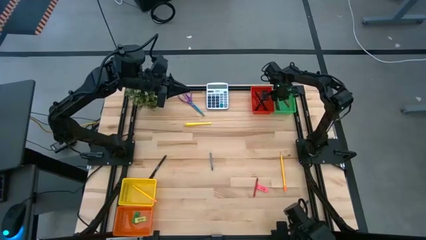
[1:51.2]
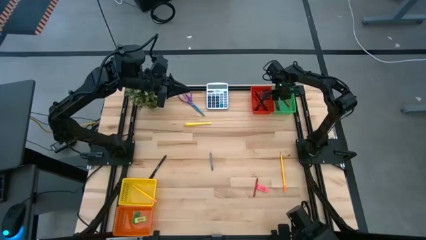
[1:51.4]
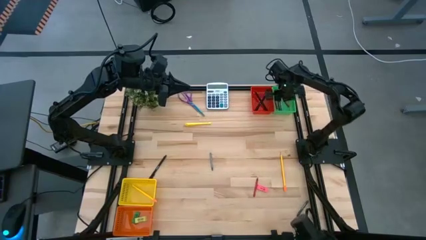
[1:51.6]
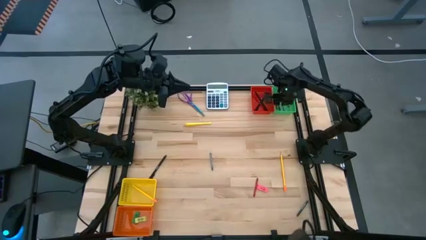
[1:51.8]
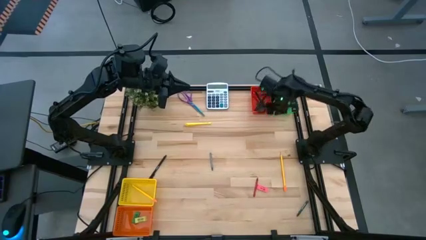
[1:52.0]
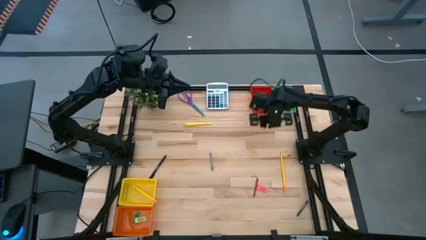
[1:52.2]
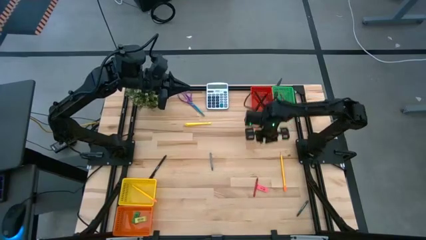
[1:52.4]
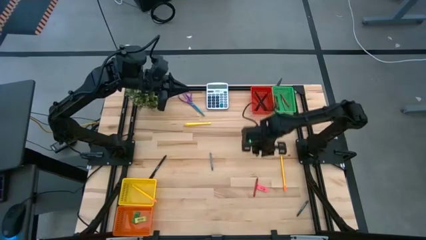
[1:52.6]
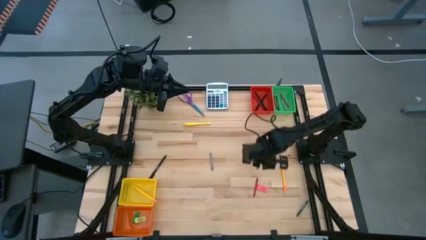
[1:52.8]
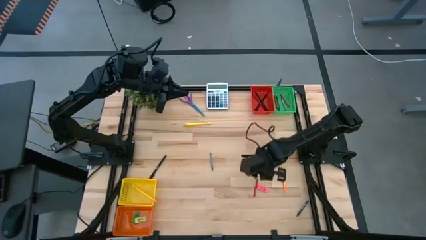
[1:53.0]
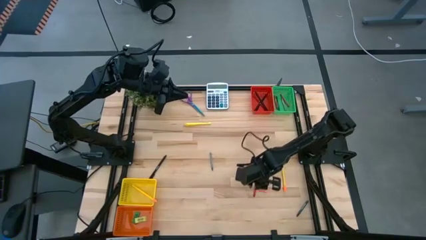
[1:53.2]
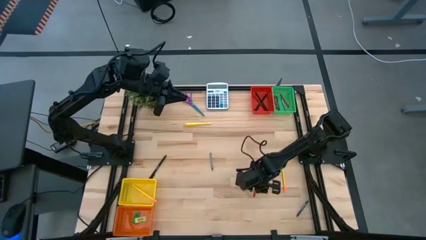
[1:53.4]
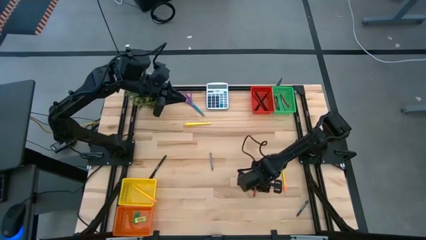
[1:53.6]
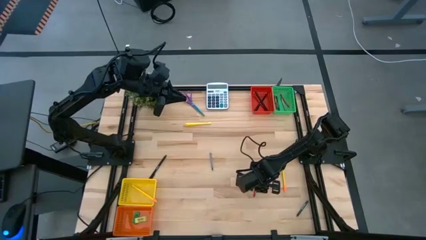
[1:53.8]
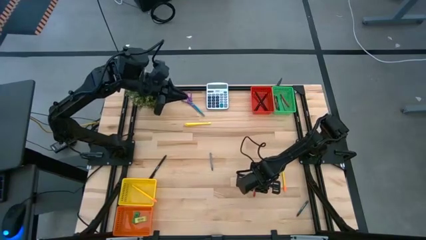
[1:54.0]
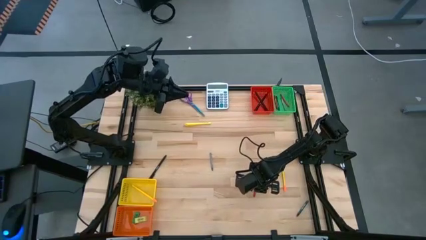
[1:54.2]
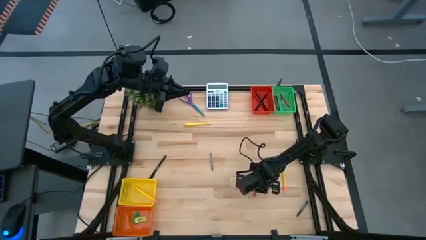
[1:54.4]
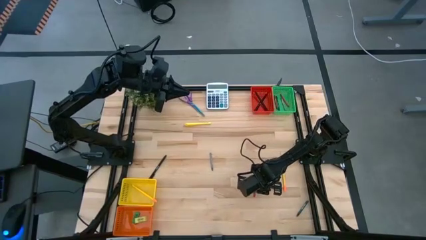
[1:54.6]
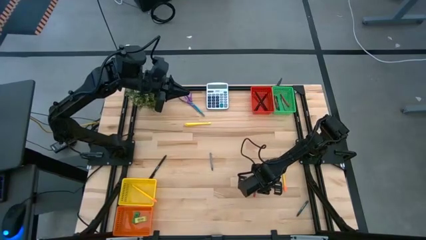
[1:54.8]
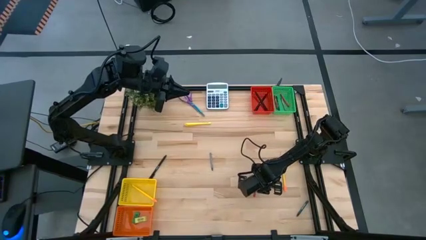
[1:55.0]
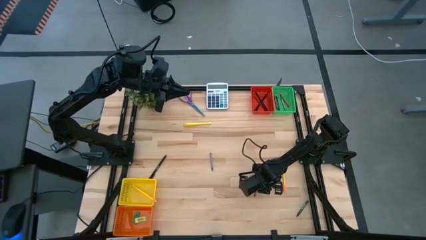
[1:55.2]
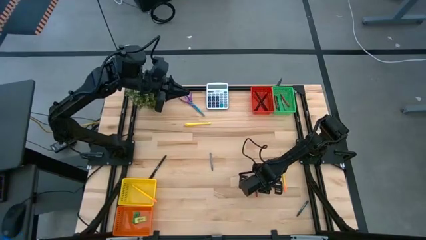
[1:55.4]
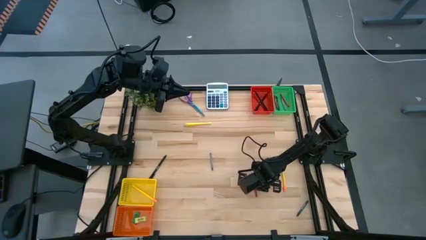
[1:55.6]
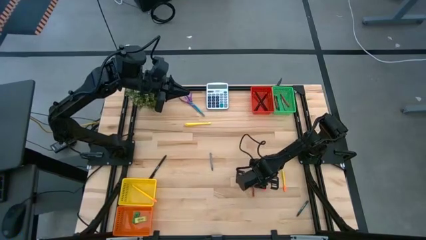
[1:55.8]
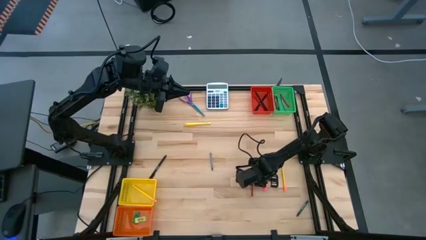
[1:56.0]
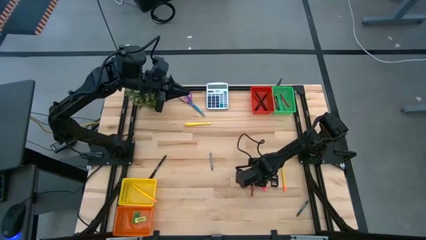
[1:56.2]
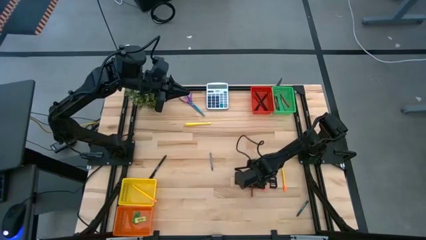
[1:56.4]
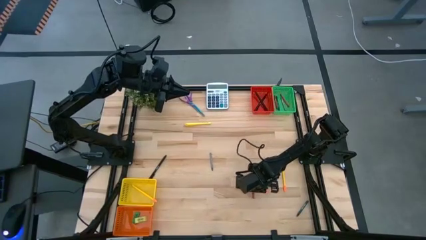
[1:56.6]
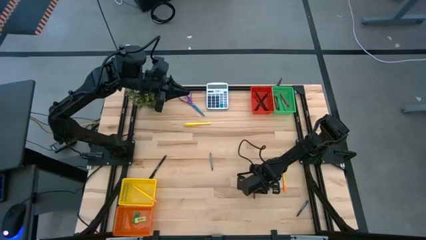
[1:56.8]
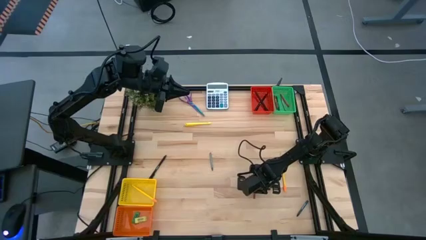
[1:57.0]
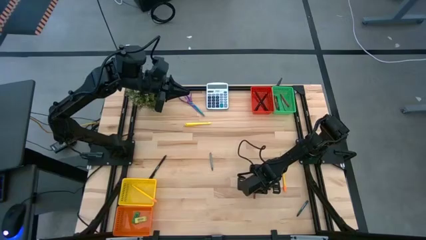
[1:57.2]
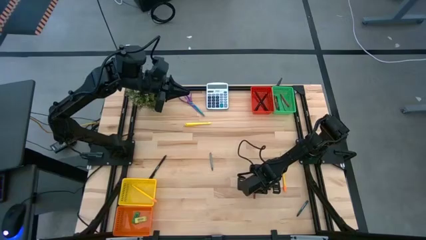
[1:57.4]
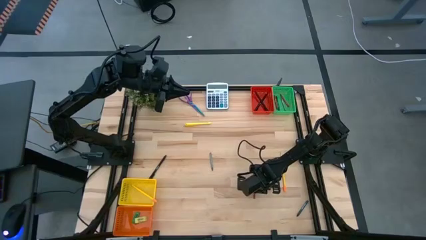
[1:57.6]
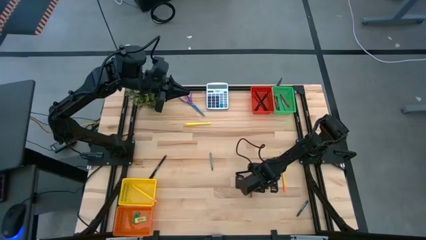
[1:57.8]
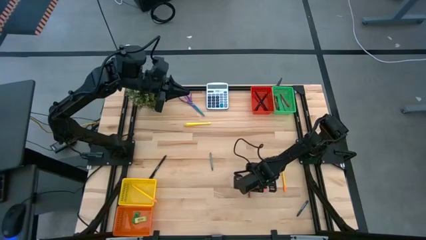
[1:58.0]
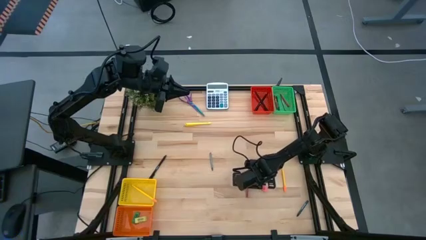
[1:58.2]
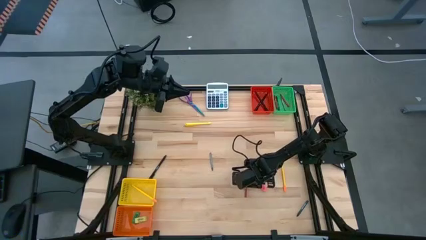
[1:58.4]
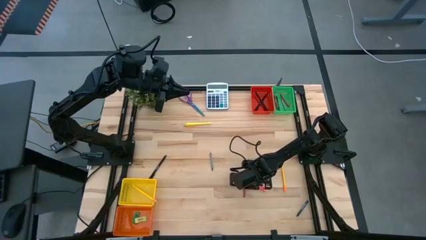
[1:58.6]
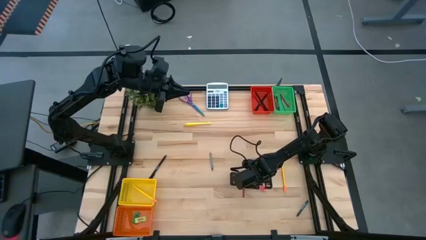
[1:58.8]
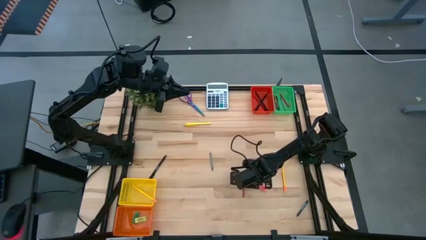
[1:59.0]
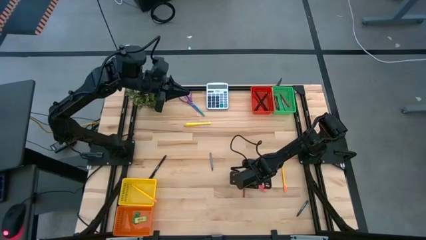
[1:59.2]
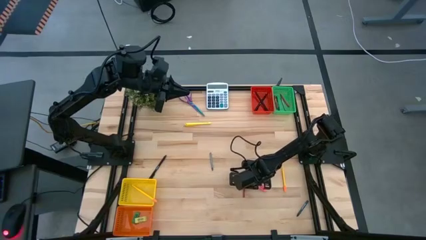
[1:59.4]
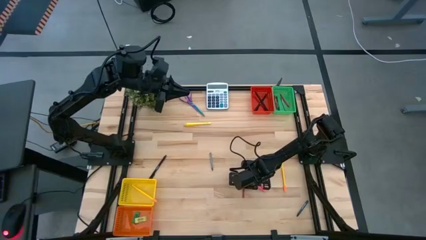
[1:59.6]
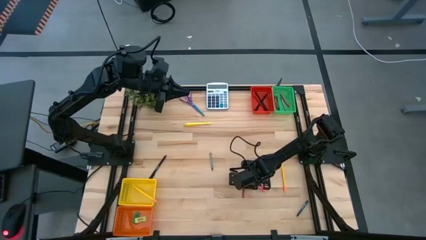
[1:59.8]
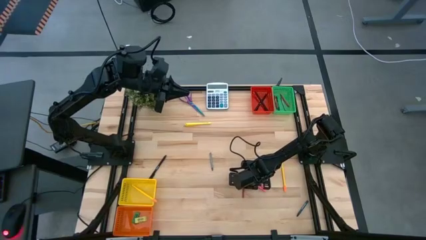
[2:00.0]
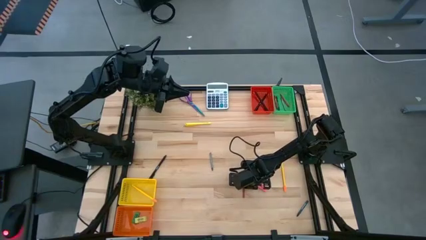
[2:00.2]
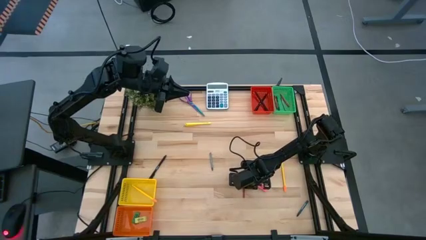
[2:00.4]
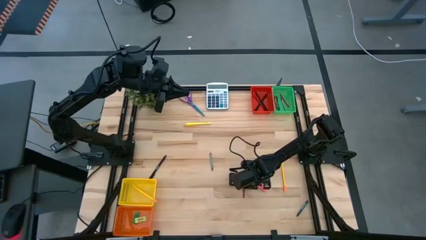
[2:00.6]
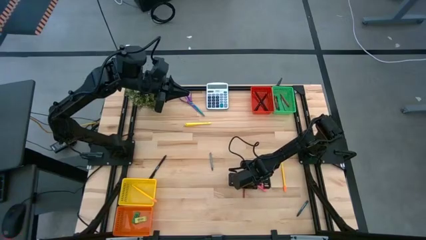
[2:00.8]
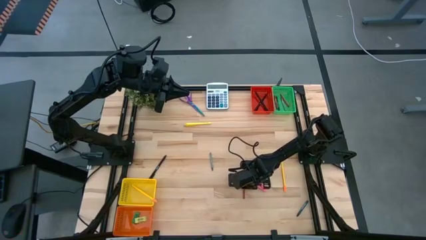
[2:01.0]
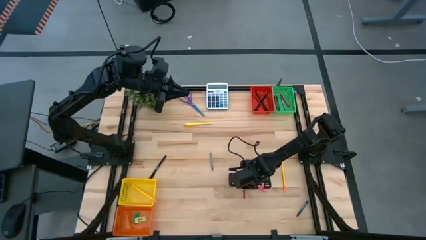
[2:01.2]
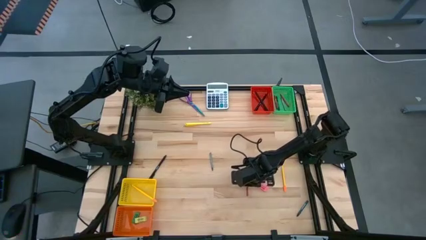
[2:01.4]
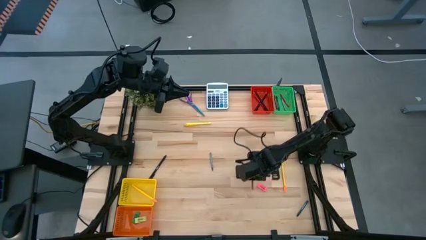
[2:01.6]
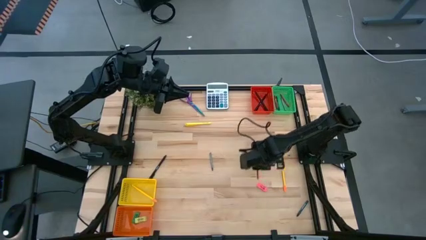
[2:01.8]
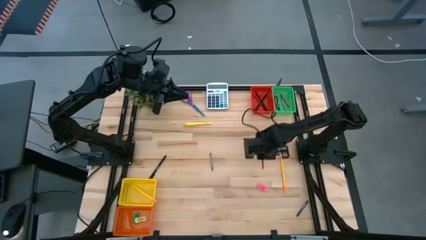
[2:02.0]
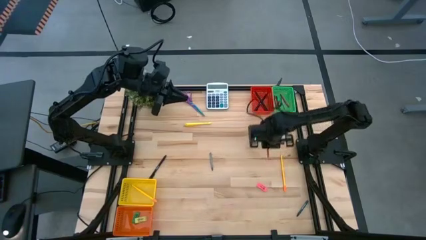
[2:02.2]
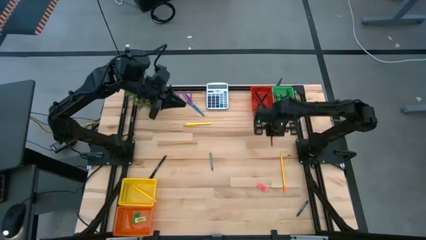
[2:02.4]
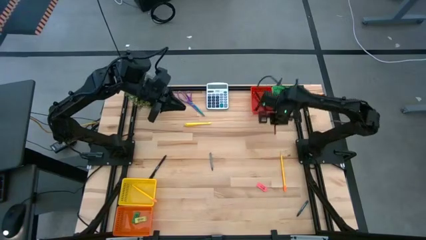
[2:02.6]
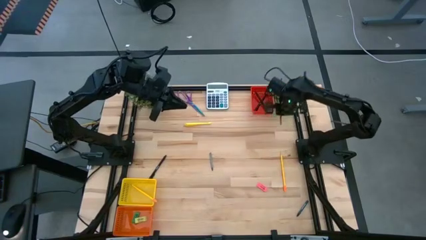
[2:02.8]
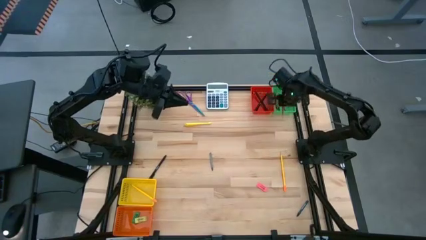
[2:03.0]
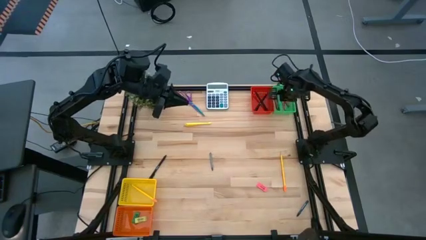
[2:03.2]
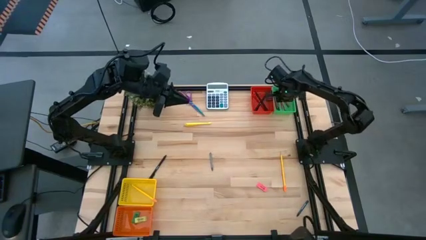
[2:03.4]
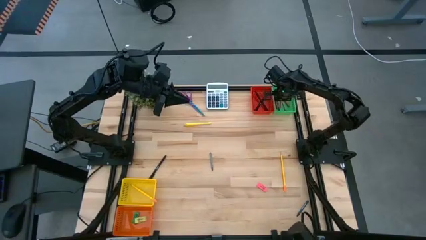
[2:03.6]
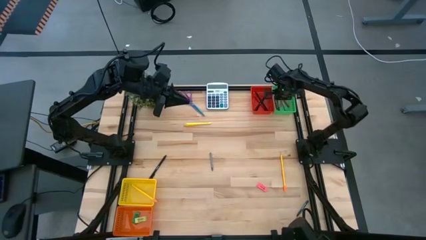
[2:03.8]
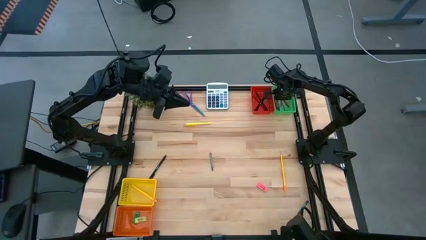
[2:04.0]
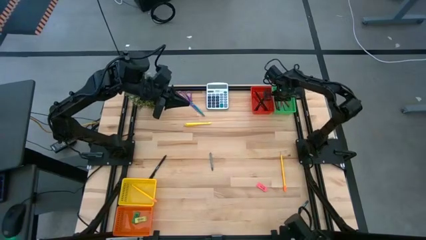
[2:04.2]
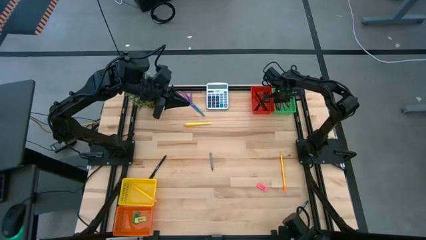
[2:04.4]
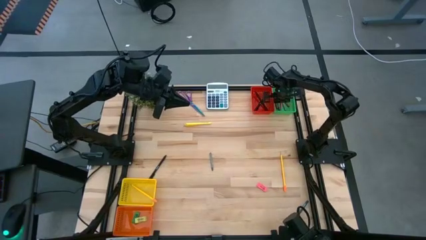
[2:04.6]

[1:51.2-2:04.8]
Task: Sort crayons/erasers/pens/pencils in bins
Put the red crayon into the green bin

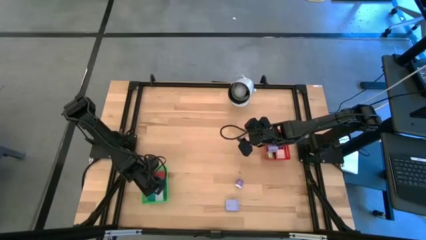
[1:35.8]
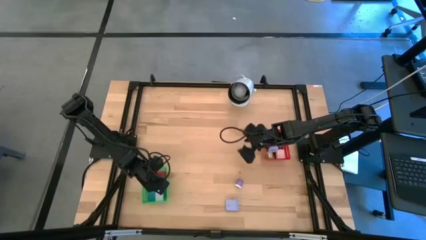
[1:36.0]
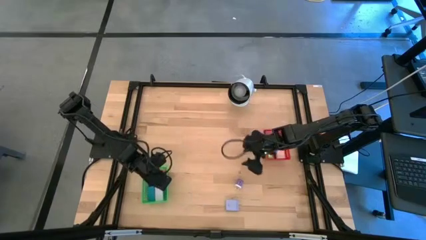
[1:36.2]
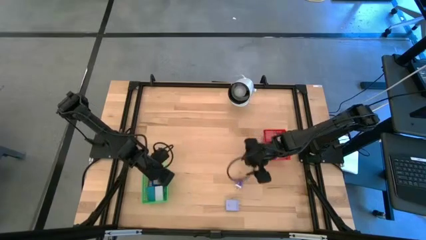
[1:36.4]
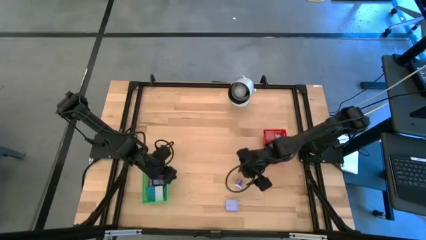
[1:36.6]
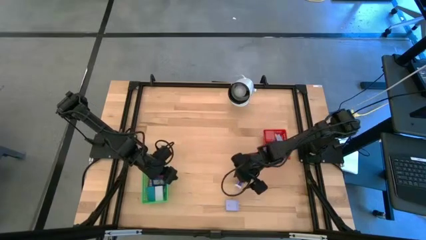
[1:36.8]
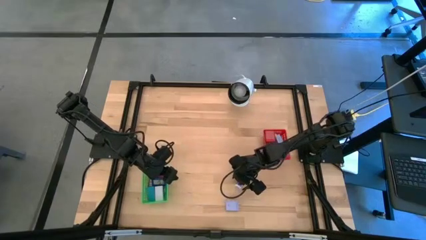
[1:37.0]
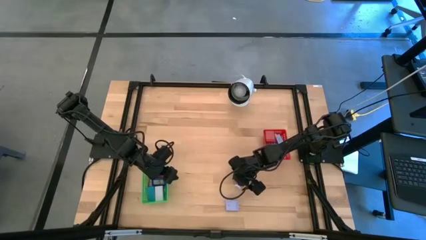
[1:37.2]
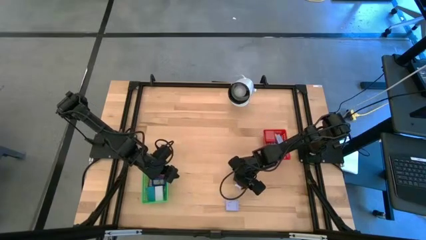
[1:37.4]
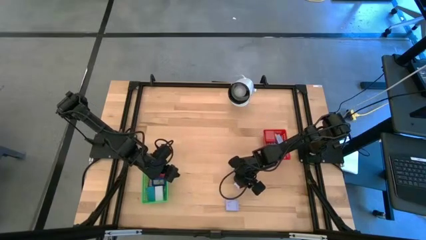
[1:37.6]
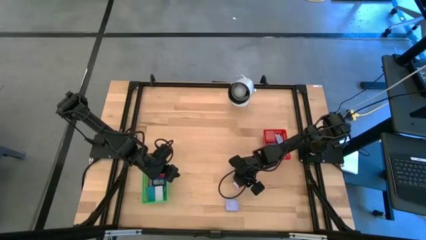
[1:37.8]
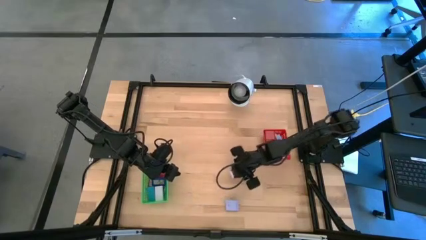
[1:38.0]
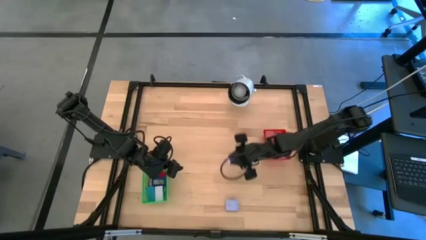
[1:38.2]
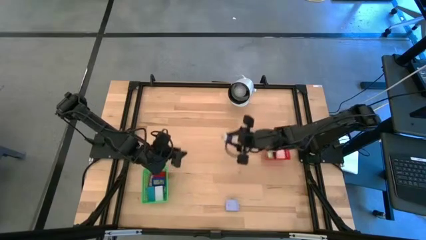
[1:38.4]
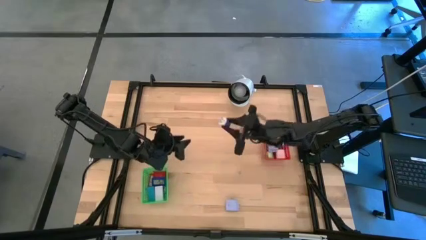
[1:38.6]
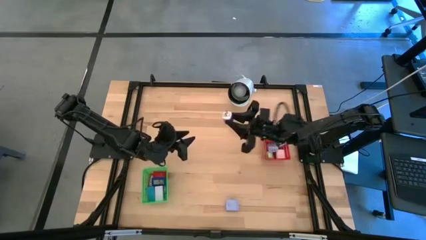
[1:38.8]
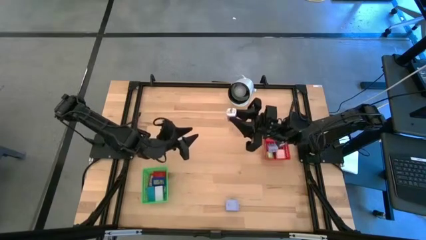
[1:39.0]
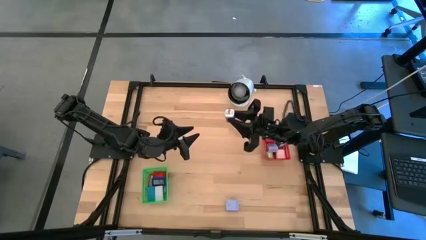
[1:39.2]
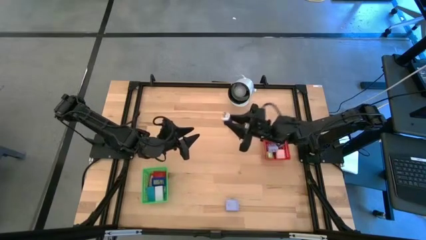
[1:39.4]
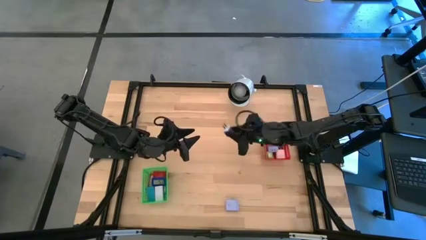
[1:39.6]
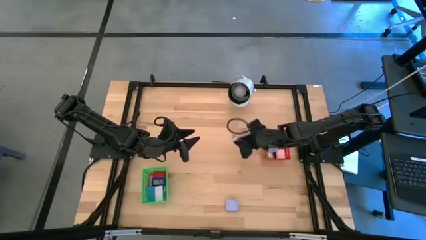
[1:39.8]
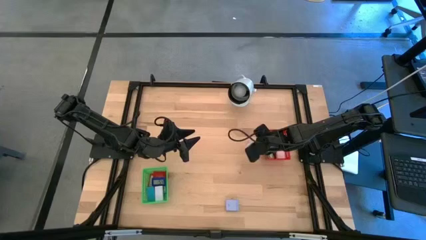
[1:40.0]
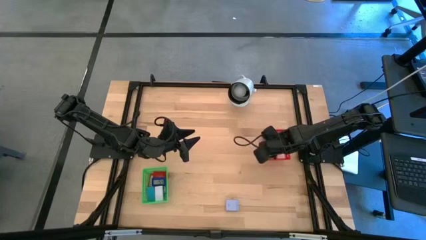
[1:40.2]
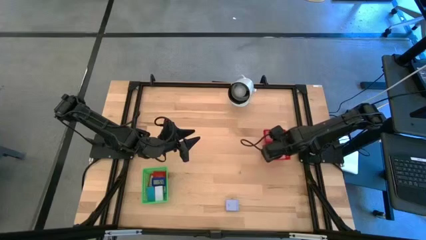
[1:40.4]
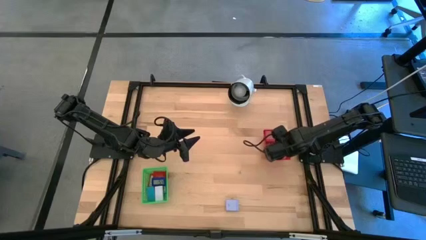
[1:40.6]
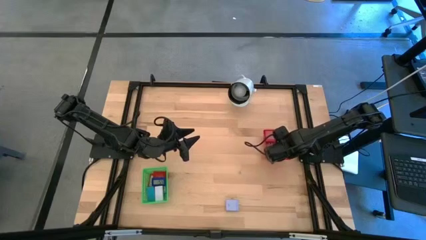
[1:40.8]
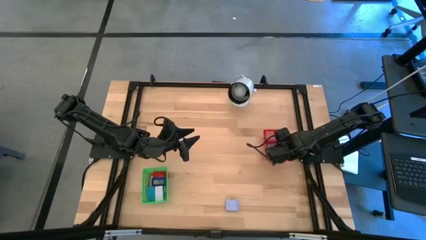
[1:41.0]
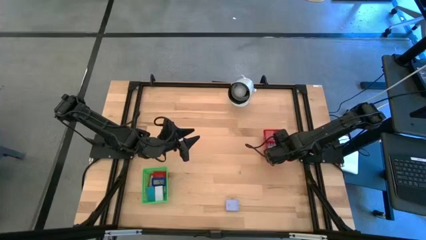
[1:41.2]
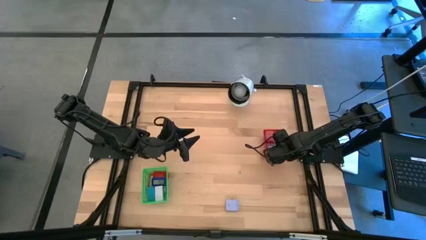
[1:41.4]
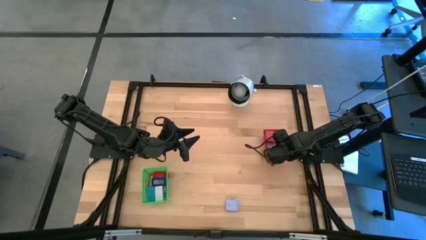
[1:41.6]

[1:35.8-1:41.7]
Task: Pick & Place Office items
Put the purple charger adapter into the red bin
